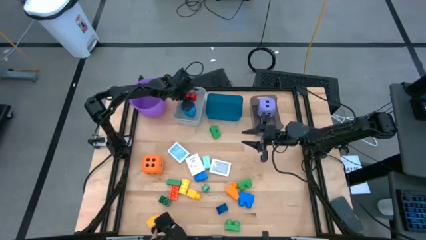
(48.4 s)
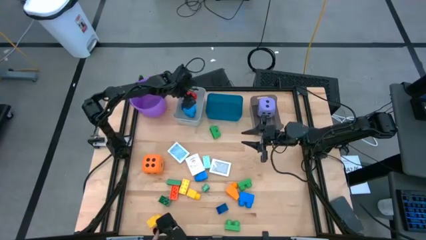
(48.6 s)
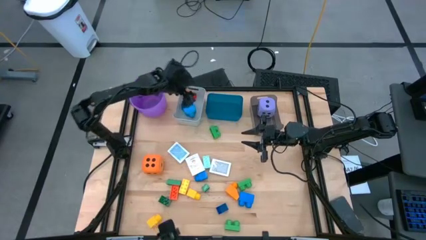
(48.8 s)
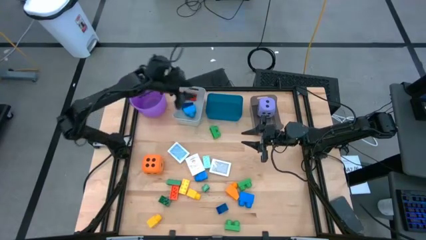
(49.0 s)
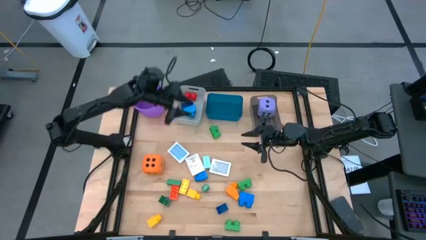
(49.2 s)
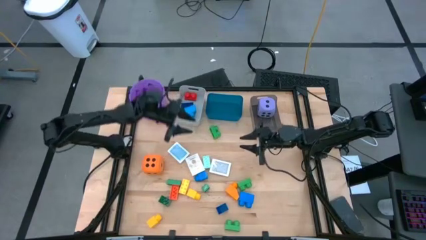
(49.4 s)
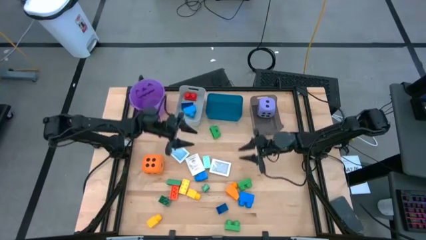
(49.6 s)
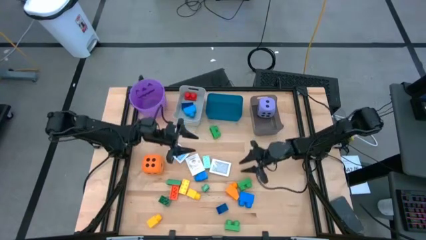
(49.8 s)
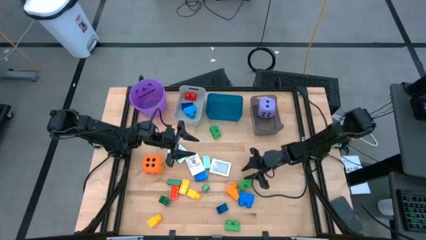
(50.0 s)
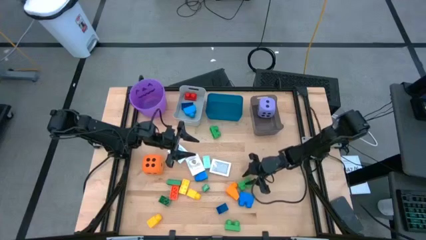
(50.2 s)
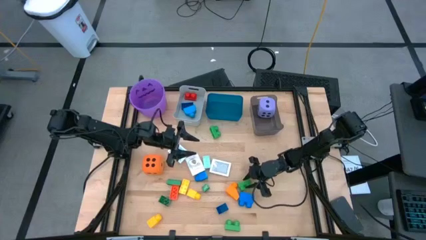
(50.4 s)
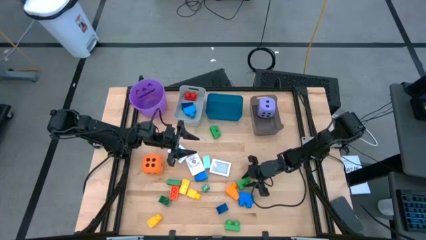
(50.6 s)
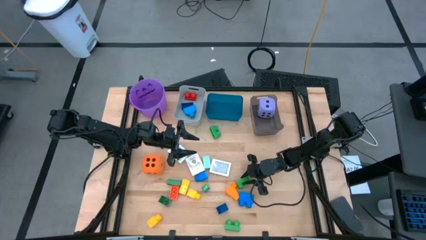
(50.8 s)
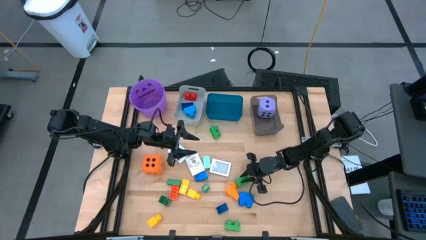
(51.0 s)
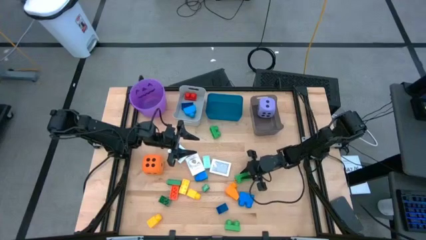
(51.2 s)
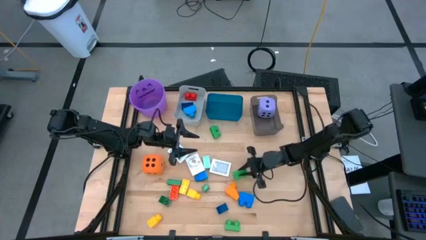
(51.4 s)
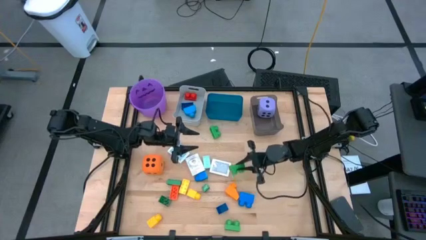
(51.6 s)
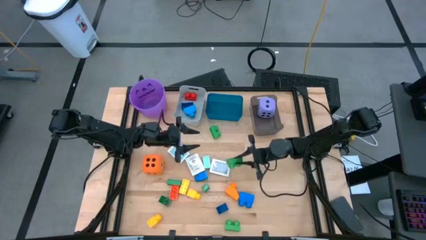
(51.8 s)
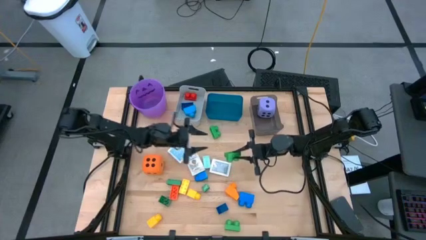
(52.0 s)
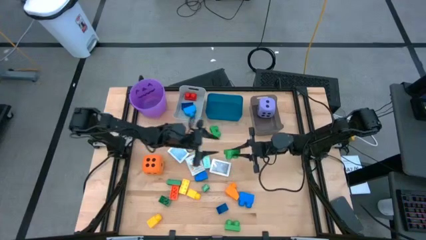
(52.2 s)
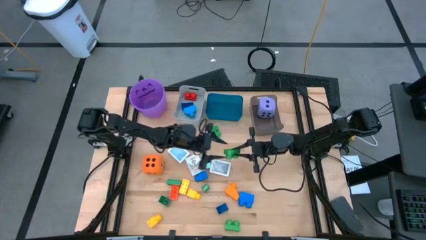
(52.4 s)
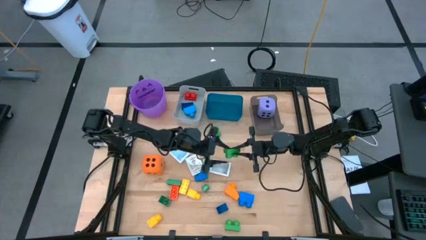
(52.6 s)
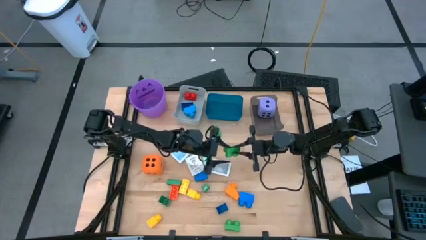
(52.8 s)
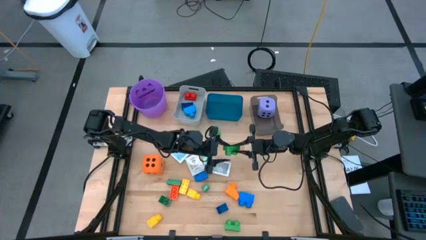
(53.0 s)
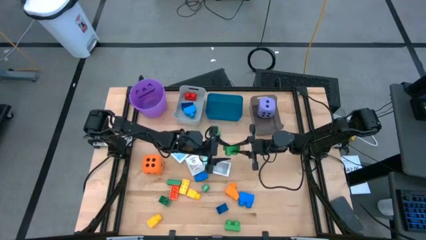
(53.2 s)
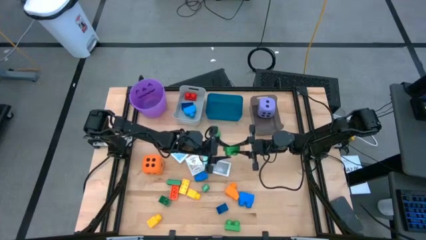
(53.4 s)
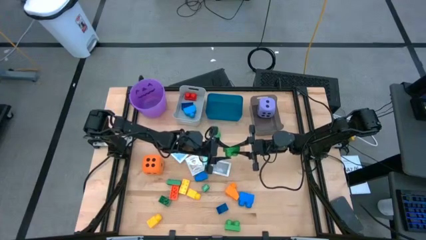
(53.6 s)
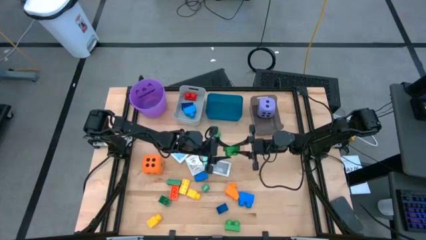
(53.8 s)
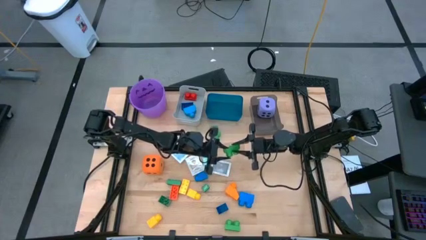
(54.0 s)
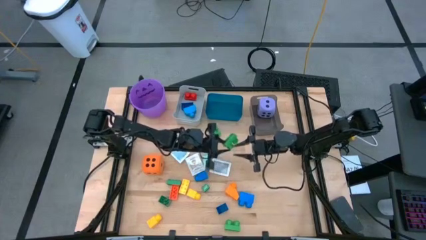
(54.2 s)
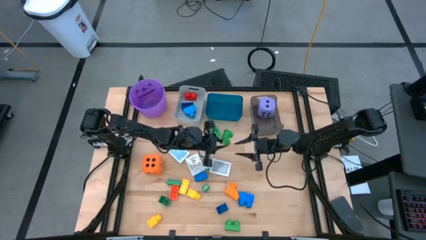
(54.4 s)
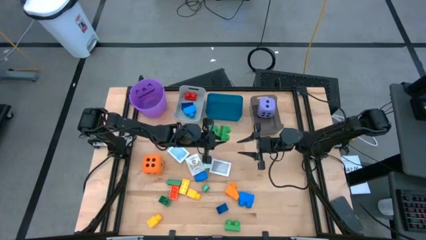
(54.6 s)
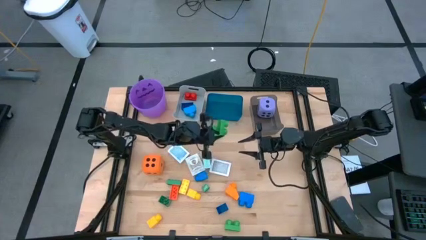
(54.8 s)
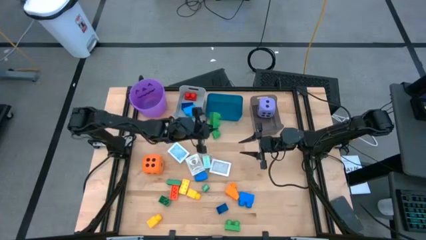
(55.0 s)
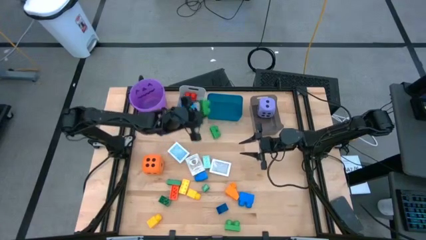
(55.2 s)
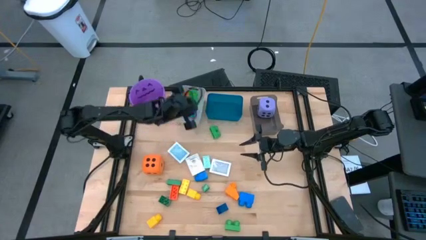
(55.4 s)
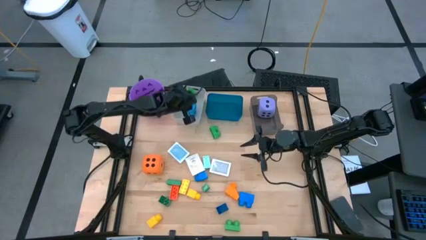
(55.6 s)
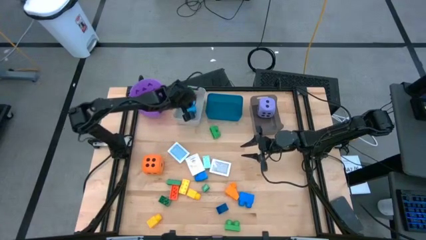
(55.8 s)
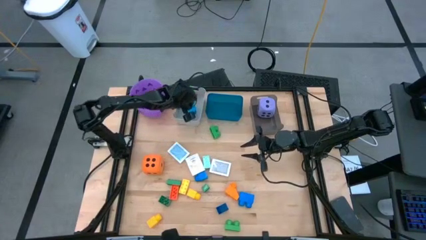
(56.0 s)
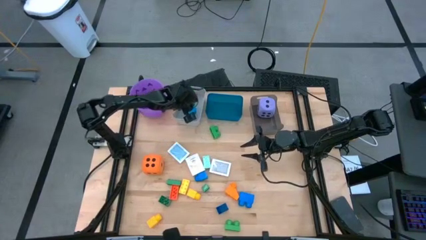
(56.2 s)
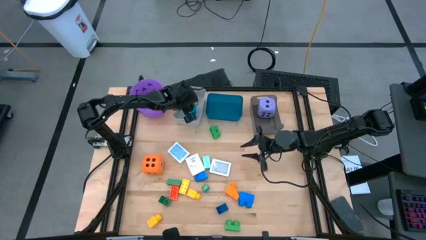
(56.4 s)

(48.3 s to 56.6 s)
Task: Pick & Place Toys
Put the middle green game piece into the gray bin

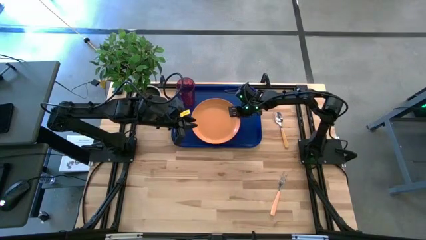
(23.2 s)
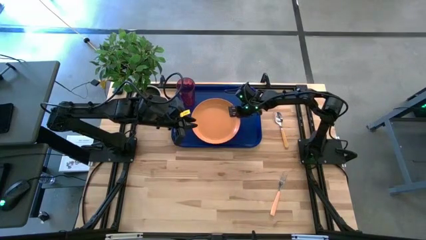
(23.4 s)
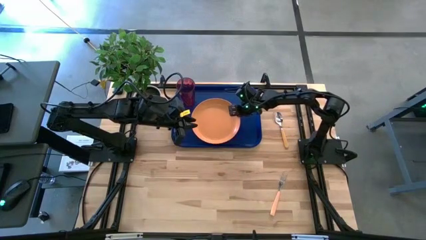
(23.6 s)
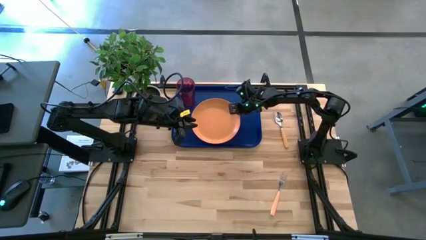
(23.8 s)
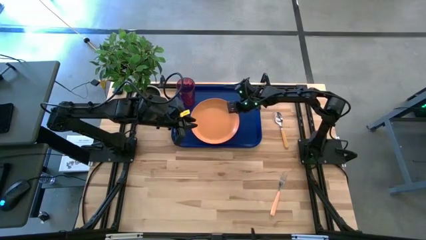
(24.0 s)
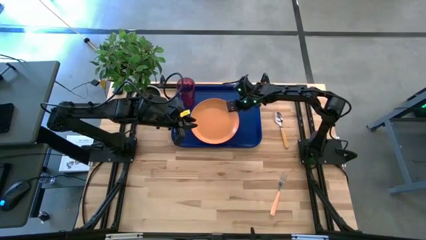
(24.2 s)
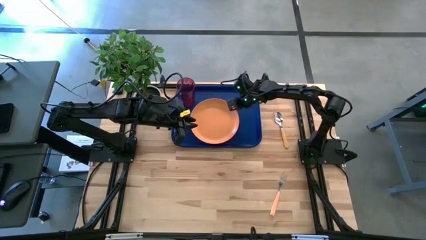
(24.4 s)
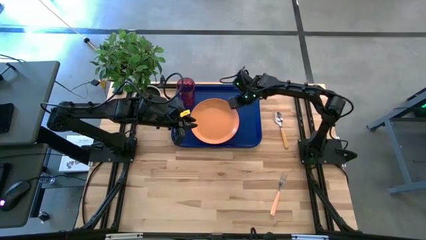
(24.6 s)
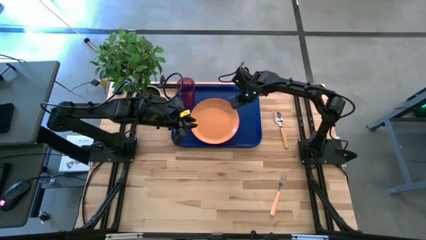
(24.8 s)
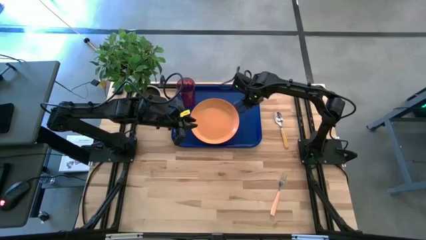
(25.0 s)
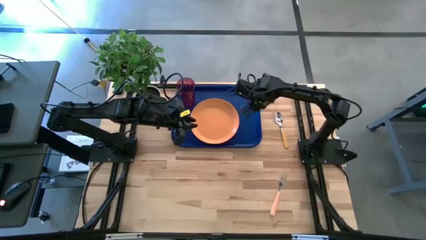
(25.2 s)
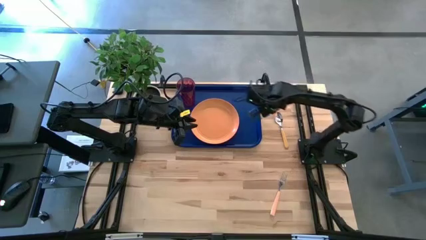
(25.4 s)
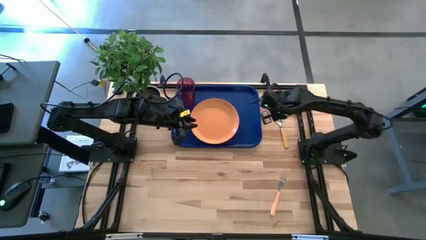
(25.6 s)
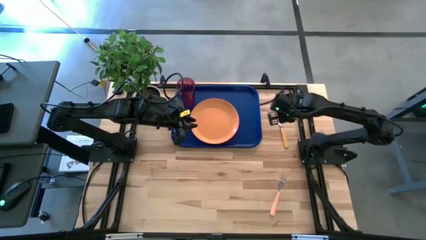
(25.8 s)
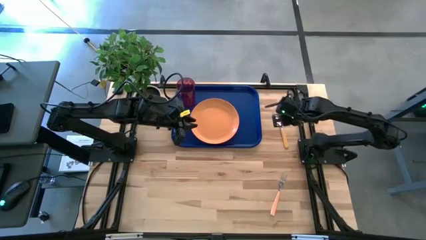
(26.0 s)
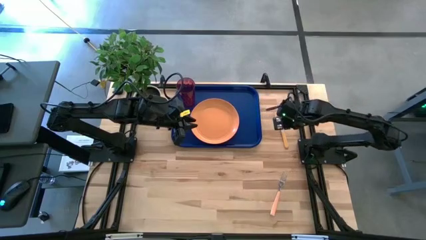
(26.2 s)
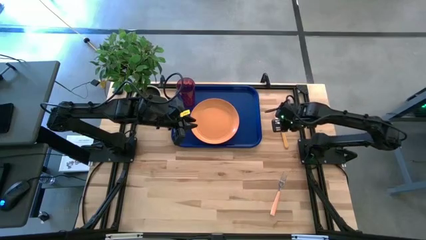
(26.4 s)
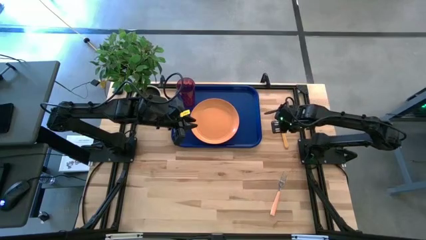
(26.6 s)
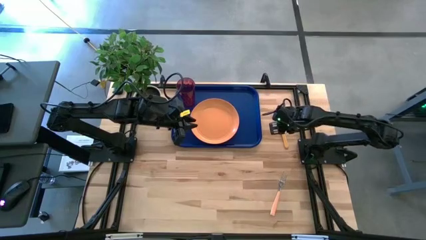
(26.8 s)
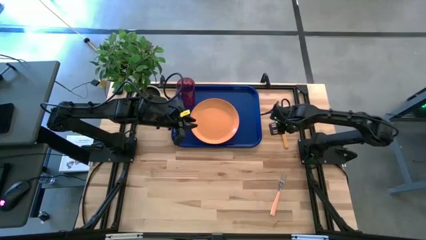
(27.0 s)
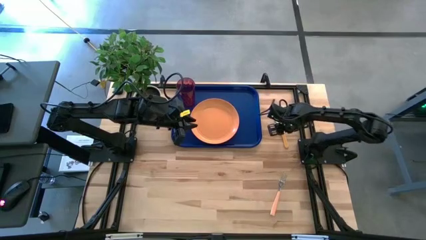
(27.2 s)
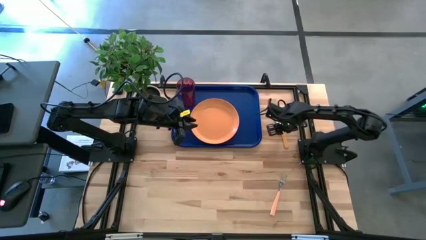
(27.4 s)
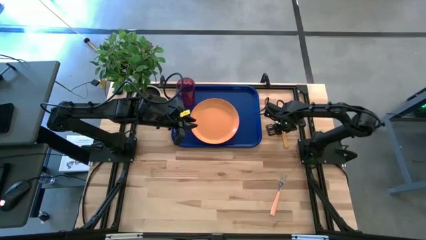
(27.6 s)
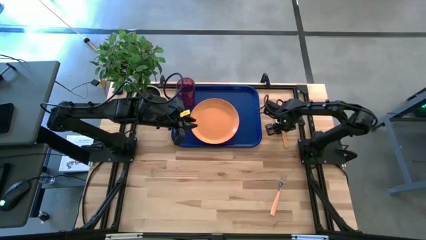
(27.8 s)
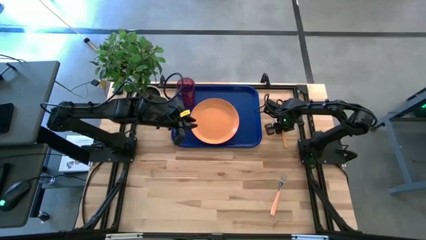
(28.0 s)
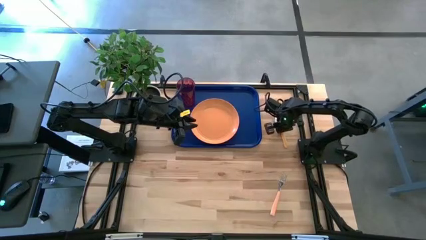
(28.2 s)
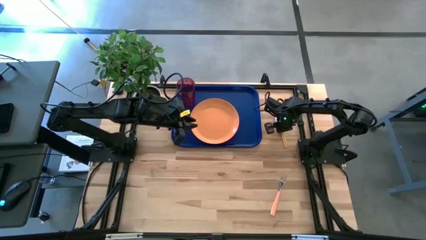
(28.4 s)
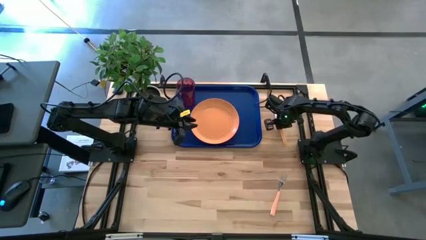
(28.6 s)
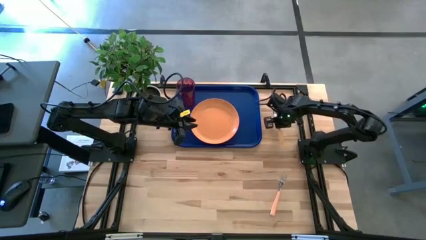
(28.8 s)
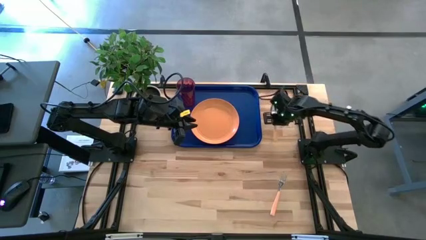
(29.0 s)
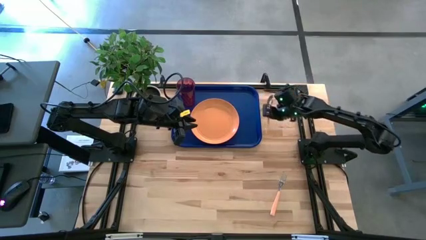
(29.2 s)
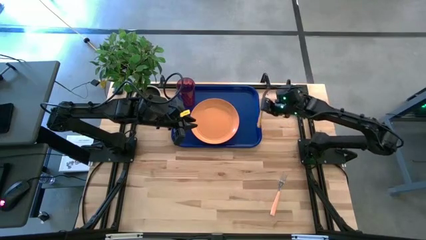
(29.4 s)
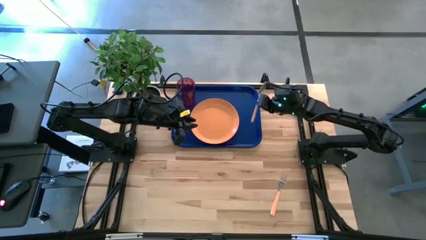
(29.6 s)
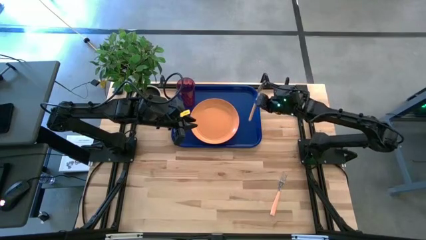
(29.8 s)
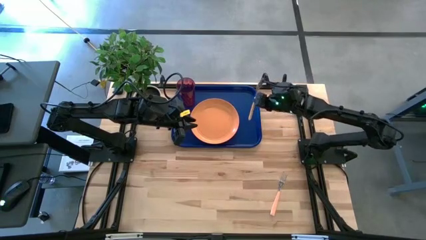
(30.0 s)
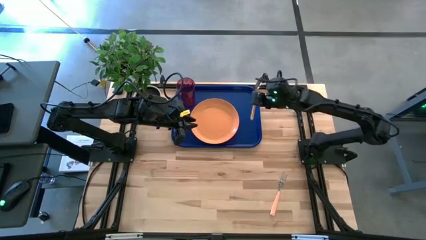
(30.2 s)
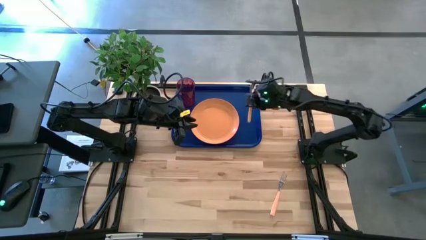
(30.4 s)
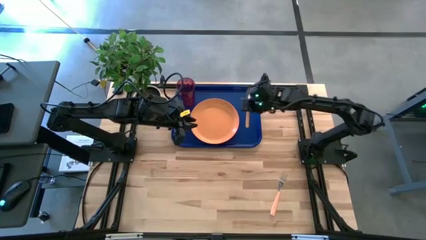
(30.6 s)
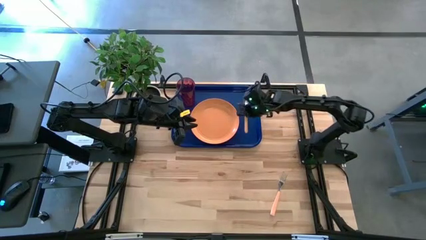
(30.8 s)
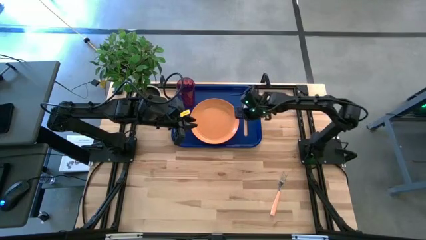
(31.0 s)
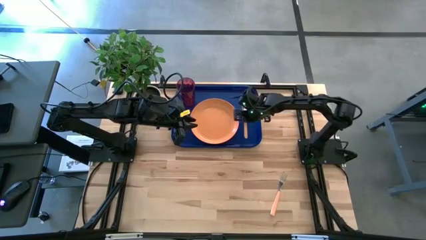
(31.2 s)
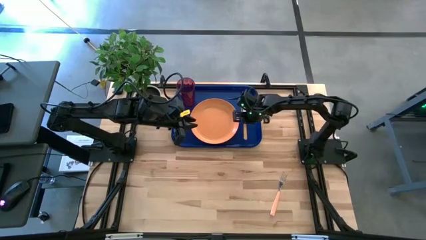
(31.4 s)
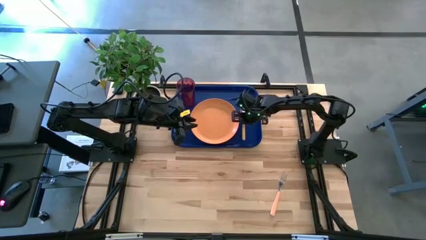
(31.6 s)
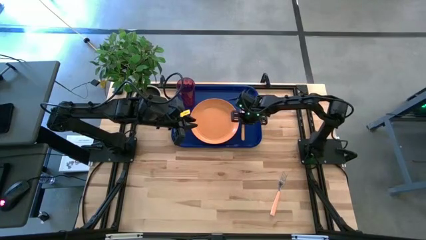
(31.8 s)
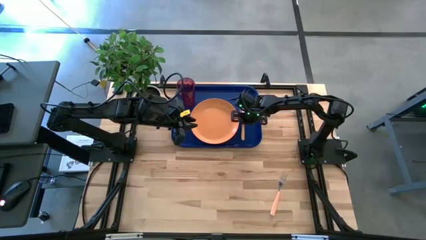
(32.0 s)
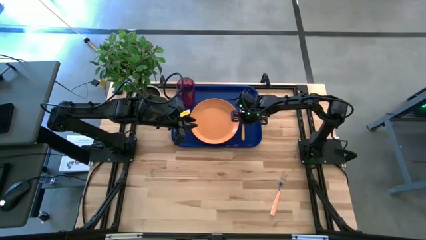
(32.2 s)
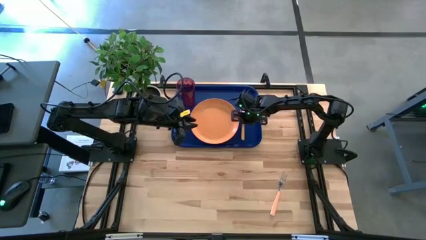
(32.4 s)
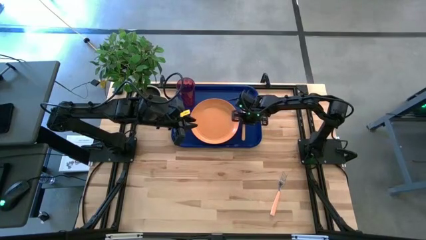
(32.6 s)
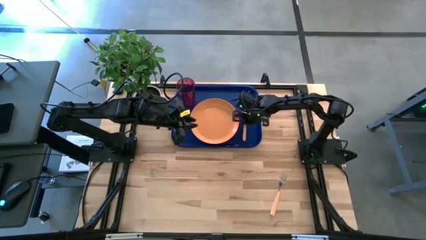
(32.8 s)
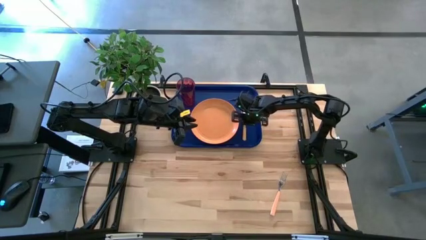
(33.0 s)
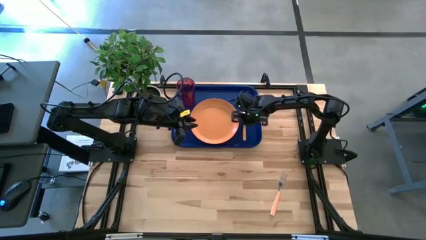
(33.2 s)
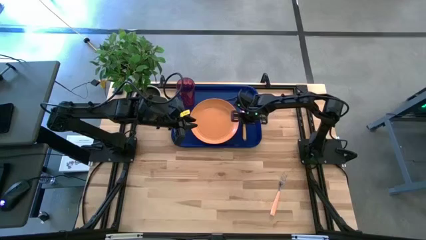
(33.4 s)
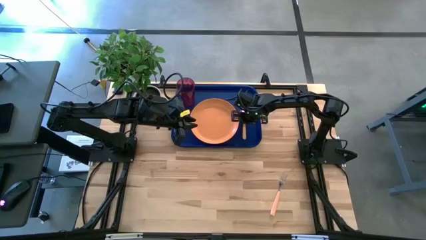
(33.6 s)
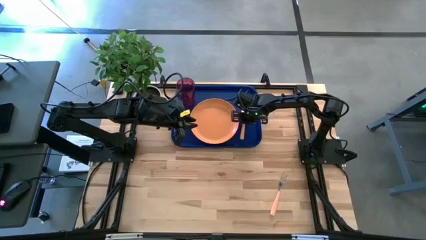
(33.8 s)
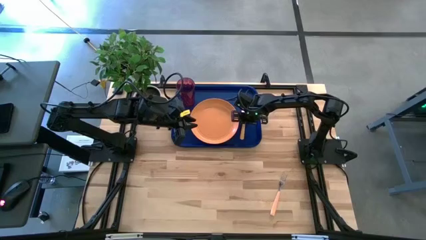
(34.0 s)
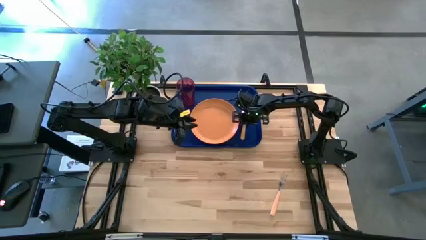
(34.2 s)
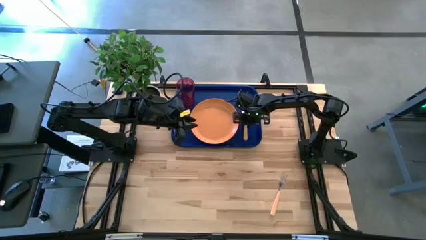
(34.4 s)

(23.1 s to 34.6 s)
Task: Pick and place plate/cup/fork/spoon on tray
Put the yellow spoon on the blue serving tray to the right of the orange plate
